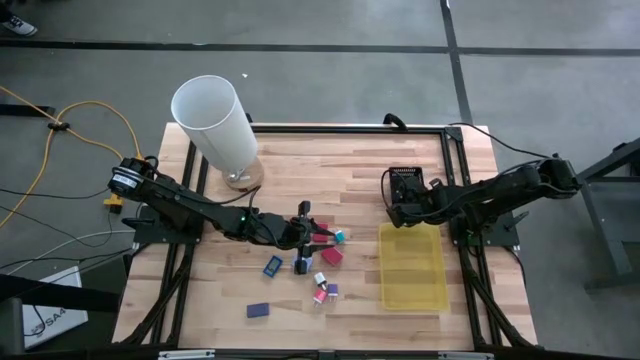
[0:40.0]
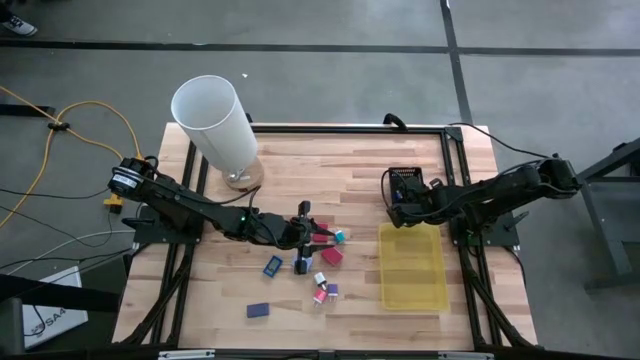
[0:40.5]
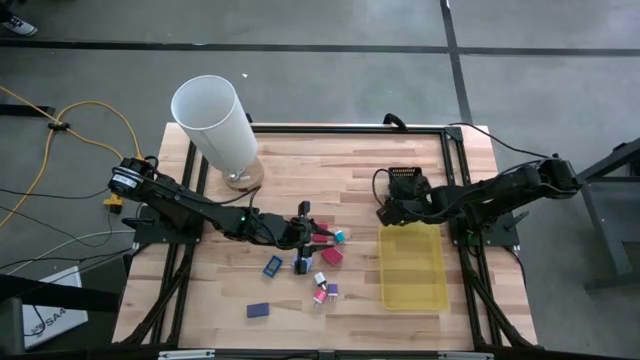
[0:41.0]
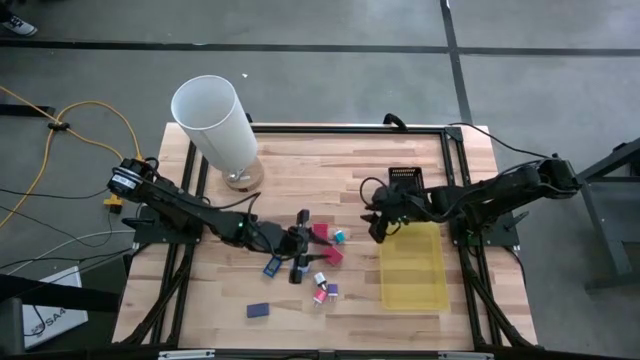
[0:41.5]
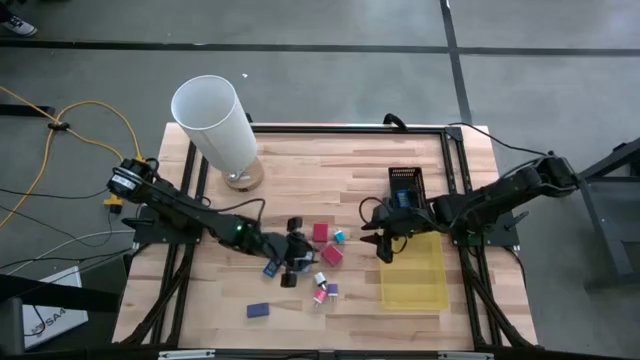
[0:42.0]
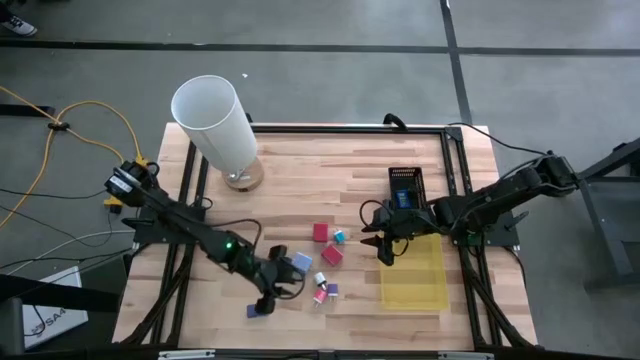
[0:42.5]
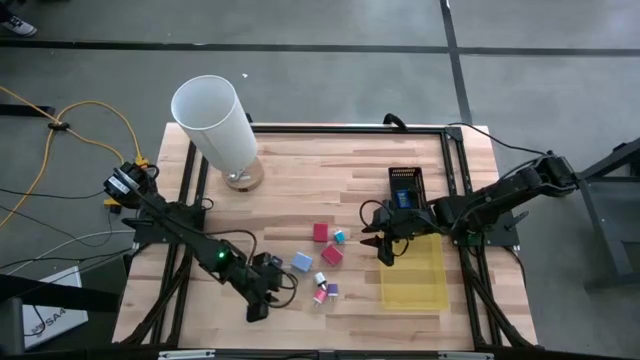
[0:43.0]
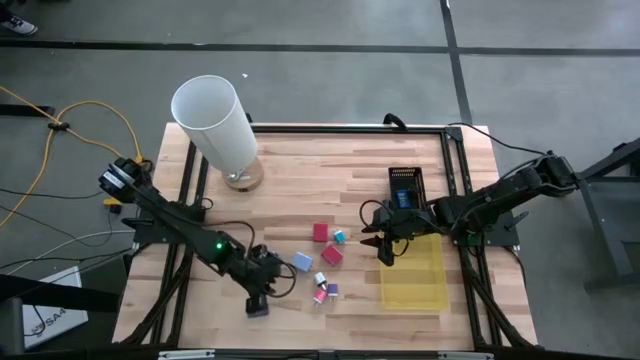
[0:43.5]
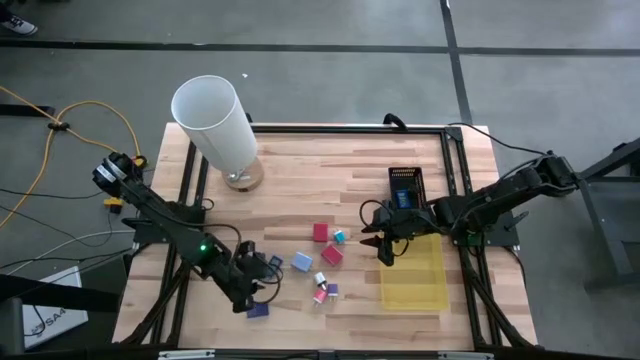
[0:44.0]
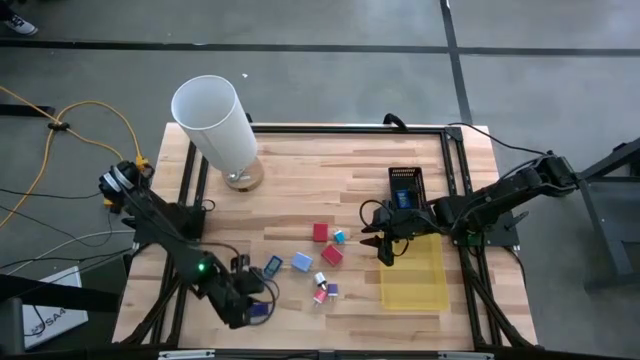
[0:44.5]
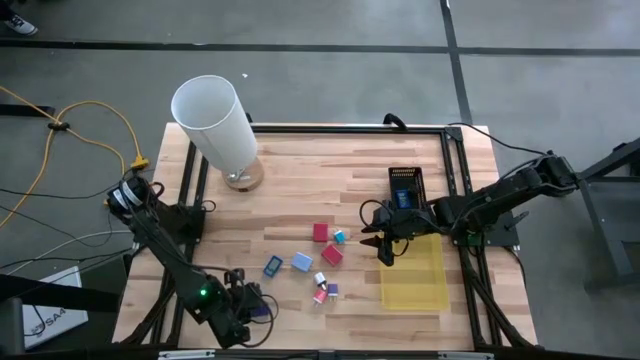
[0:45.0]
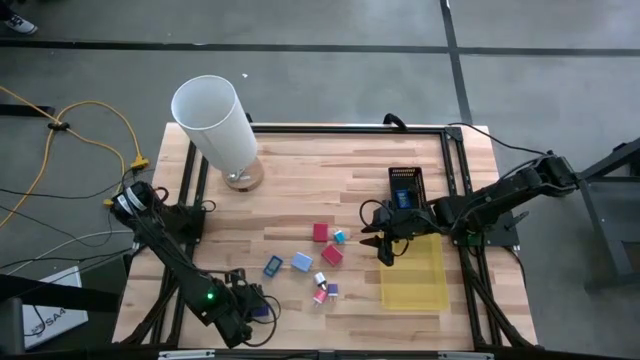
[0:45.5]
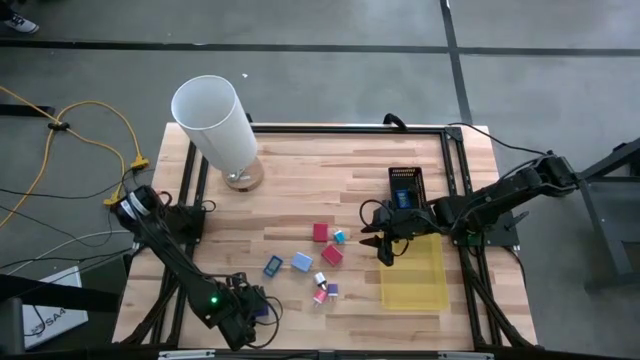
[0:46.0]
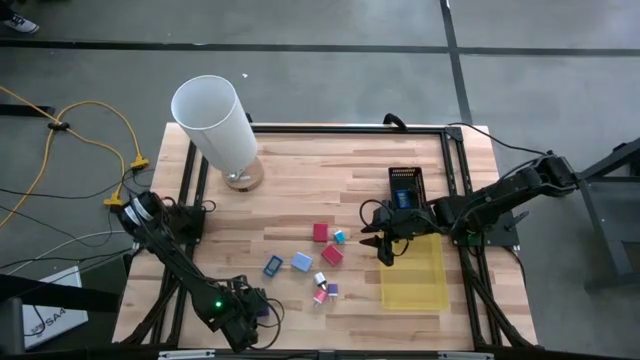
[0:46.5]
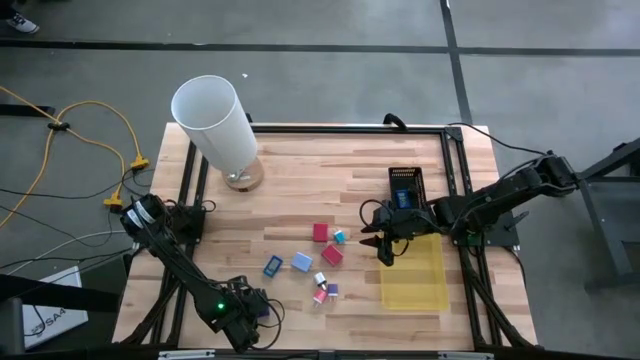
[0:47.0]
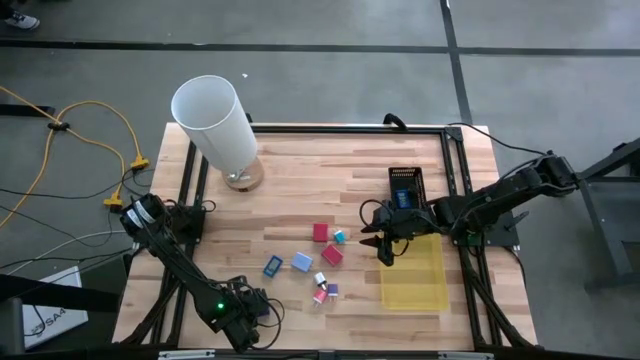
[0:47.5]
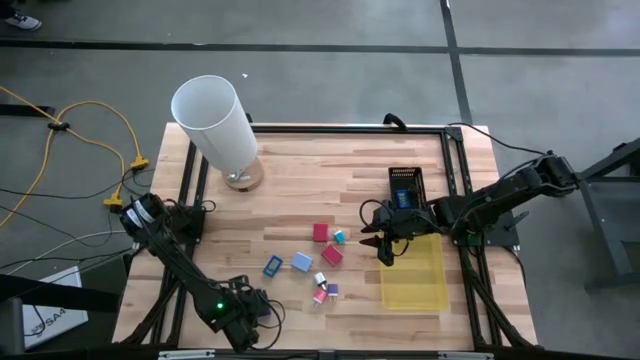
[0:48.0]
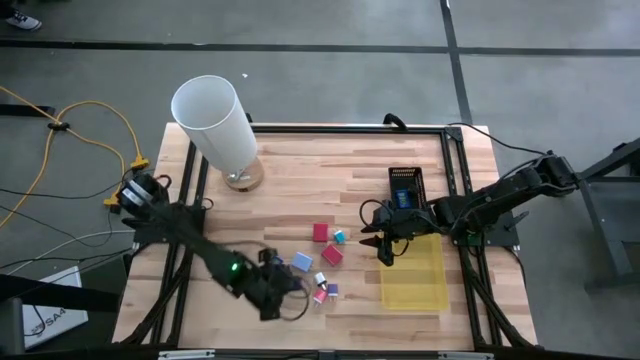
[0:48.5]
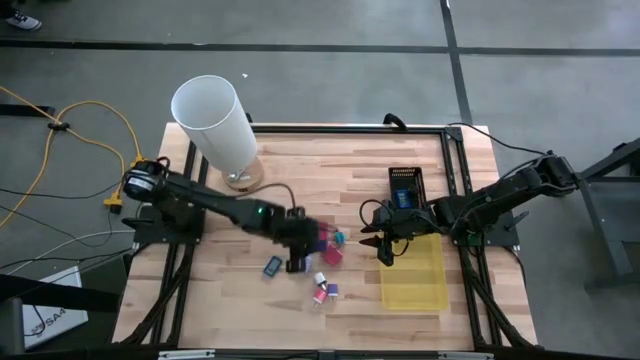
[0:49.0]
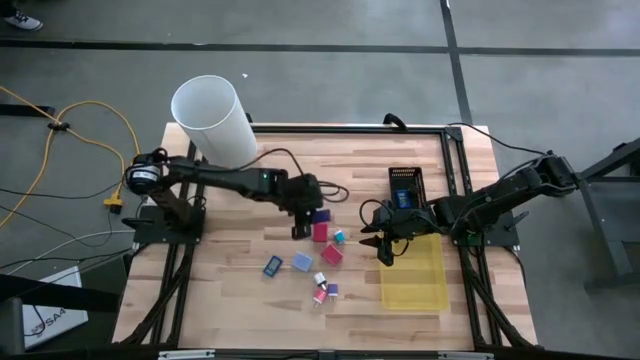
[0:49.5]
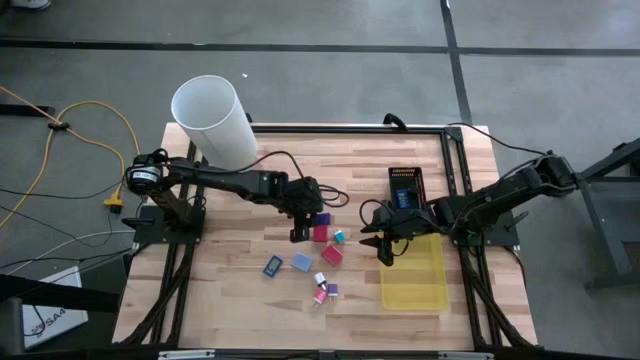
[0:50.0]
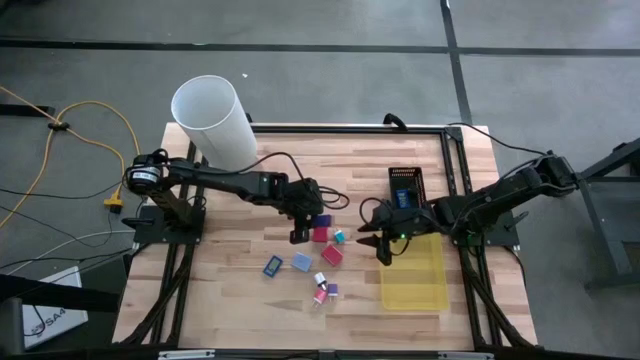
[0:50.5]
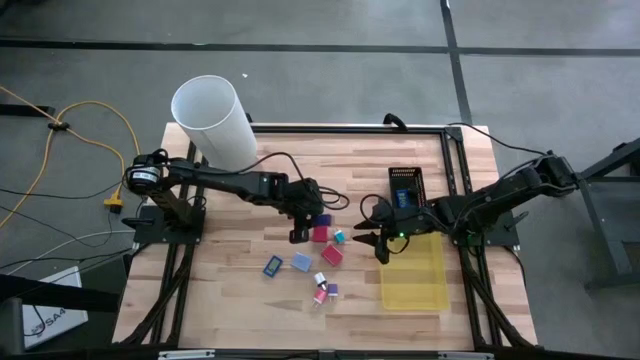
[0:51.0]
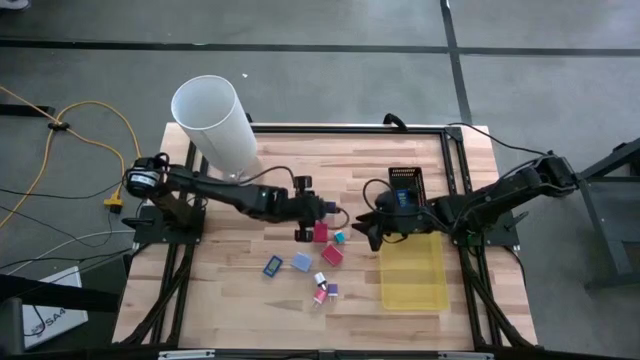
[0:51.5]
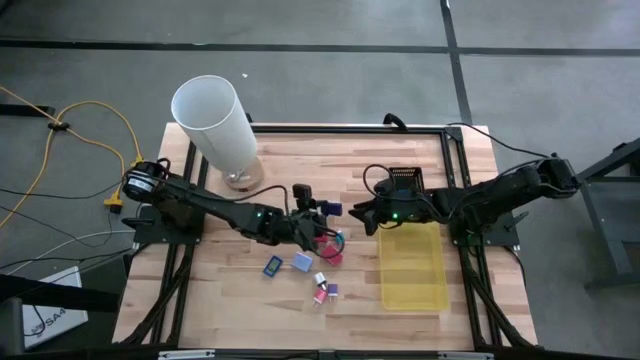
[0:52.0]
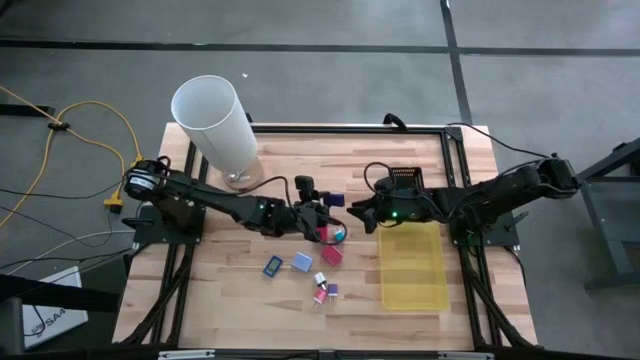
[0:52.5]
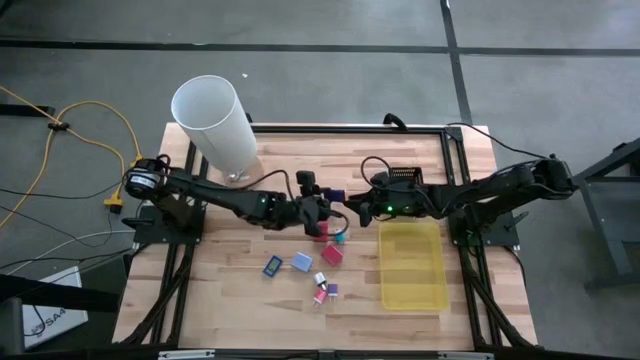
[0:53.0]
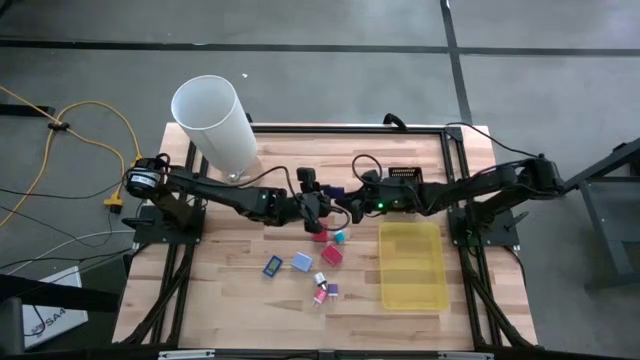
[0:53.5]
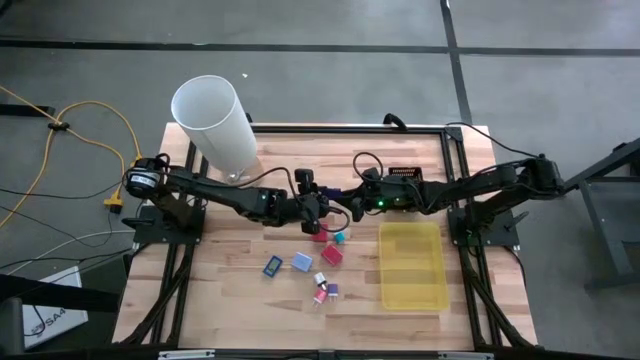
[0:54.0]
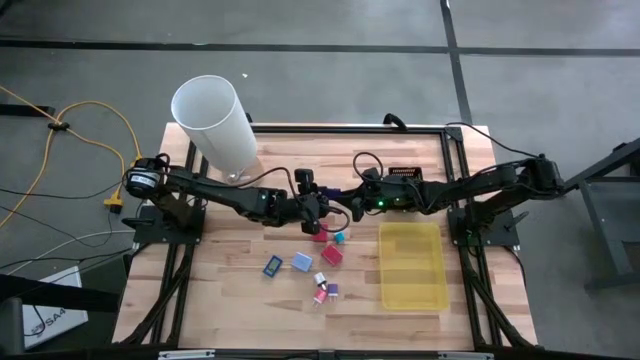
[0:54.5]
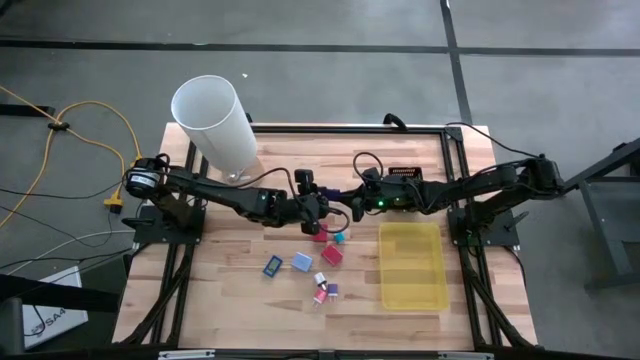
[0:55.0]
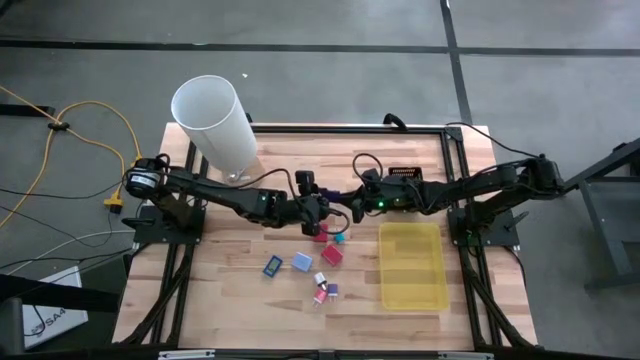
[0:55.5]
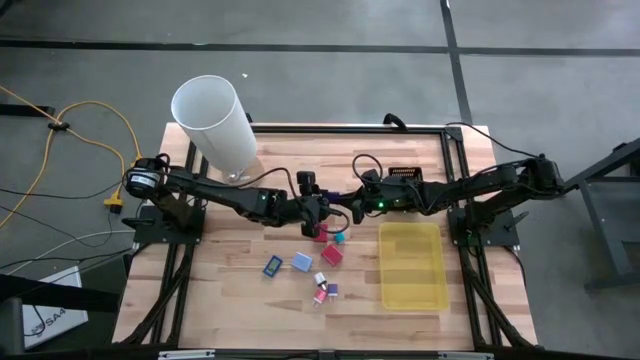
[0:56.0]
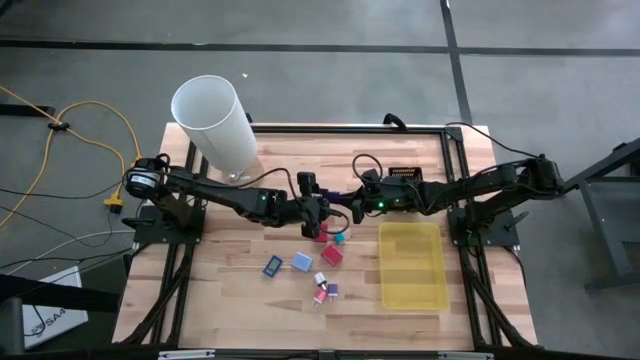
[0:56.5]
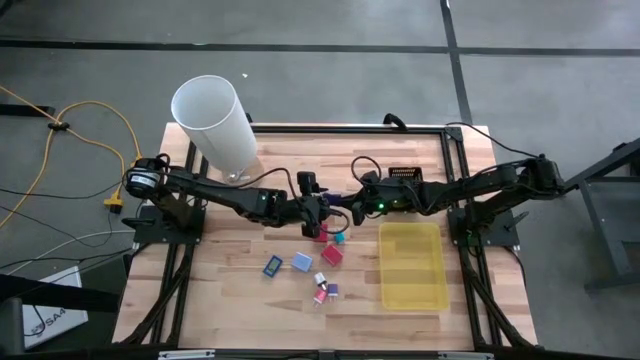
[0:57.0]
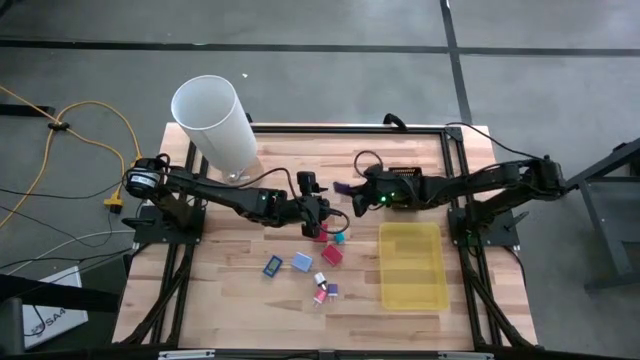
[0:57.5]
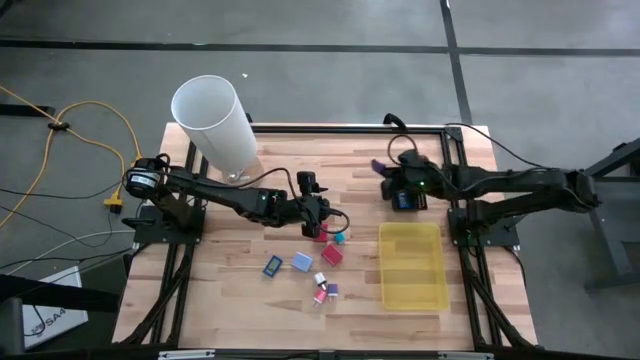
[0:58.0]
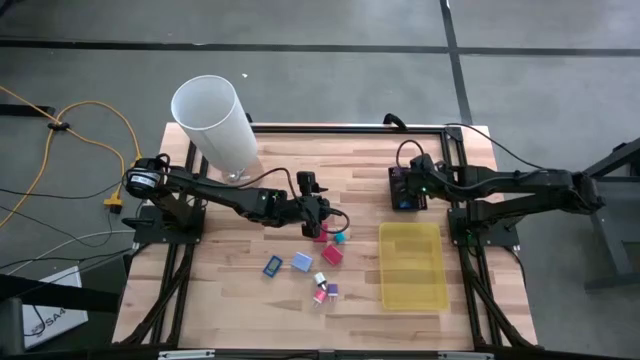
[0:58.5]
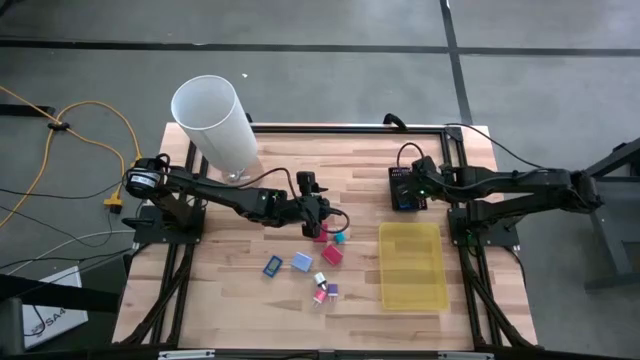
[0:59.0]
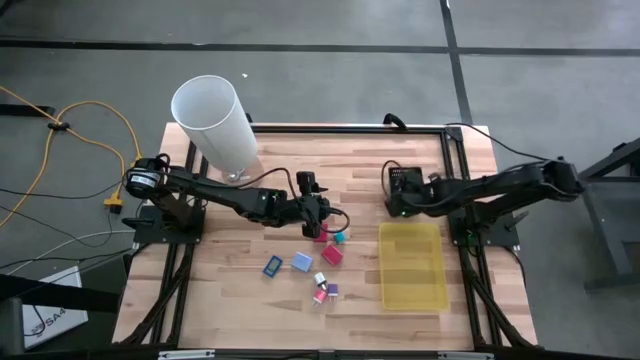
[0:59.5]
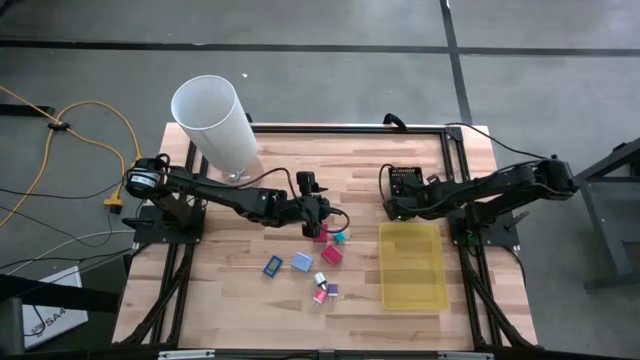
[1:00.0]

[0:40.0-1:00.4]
Task: Pick & Place Office items
Put the bottom blue digital clock into the black bin

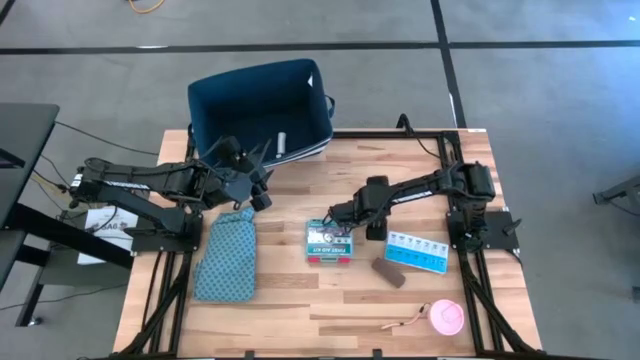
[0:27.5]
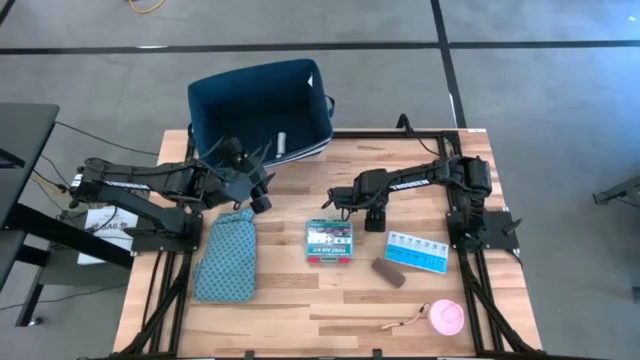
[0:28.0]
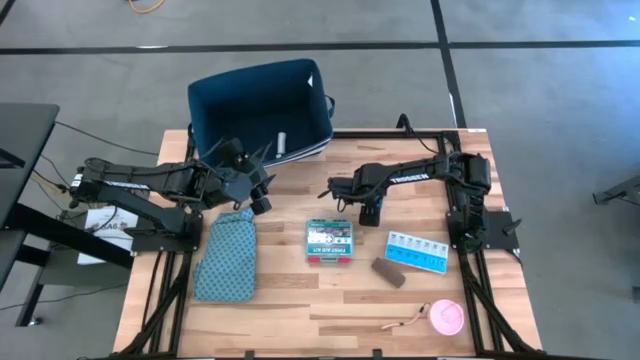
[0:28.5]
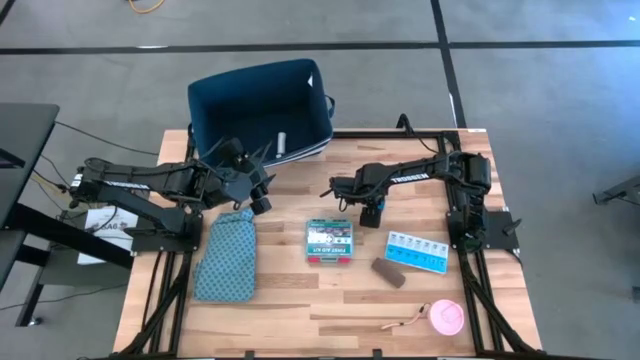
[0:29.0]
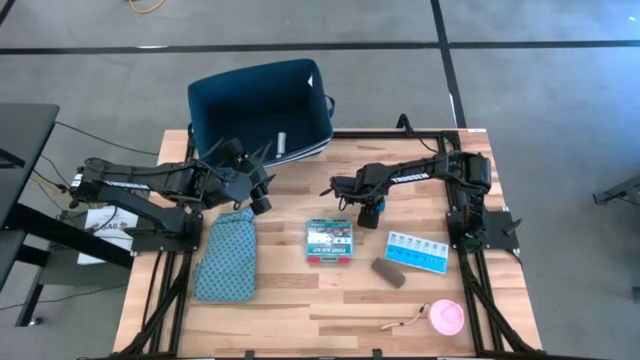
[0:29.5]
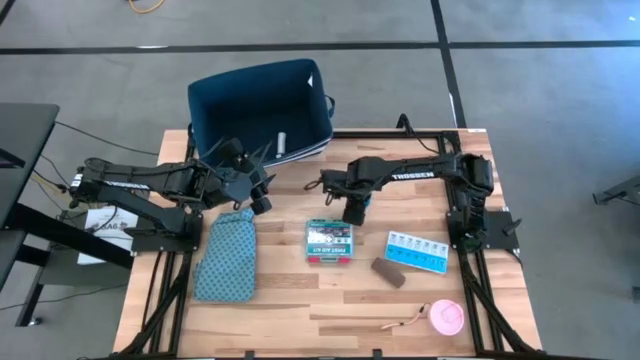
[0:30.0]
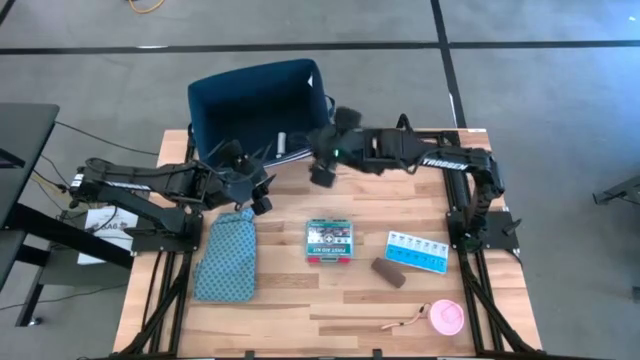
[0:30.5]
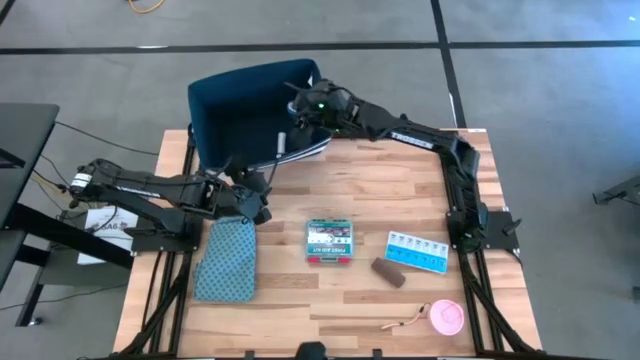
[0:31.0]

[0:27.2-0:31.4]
Task: Pick & place medical supplies in basket/bin
Put the blue bandage into the blue bin
